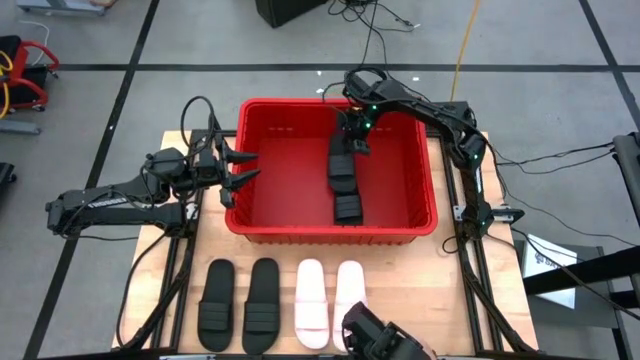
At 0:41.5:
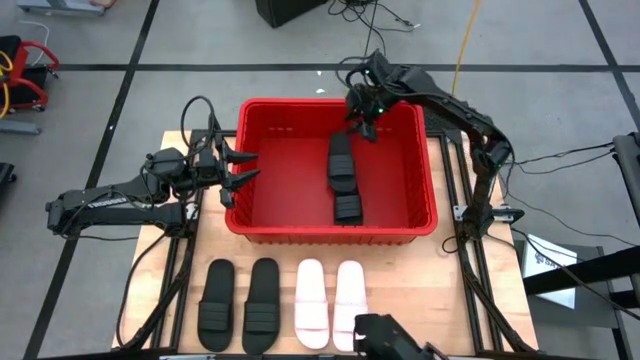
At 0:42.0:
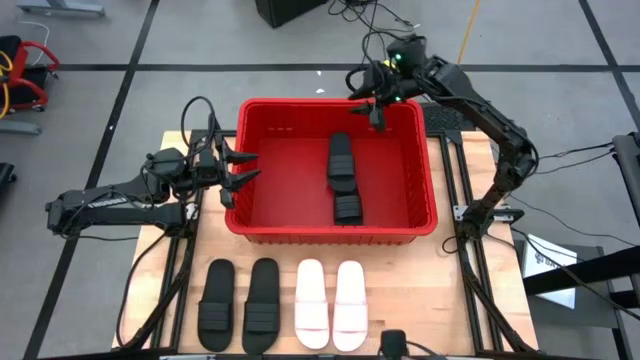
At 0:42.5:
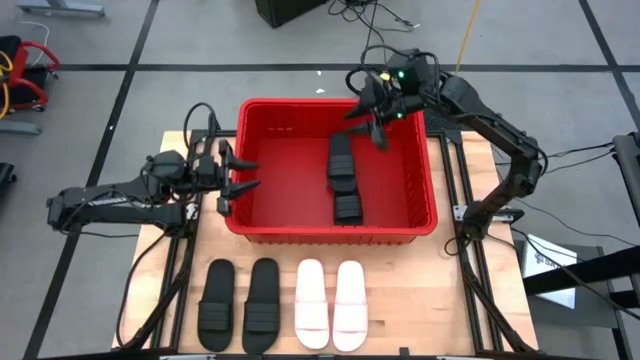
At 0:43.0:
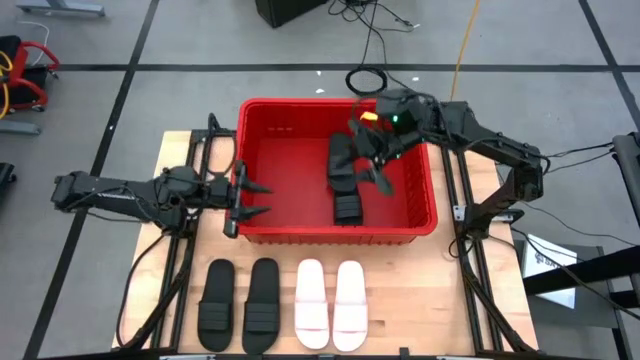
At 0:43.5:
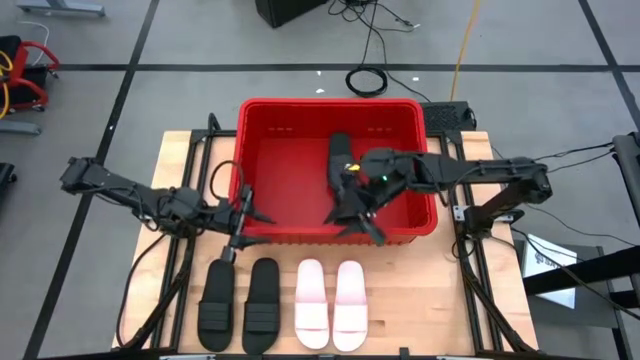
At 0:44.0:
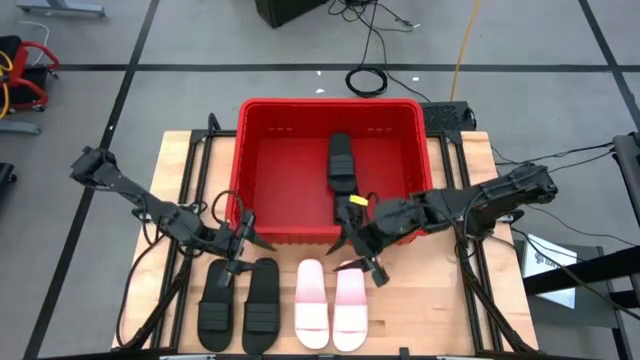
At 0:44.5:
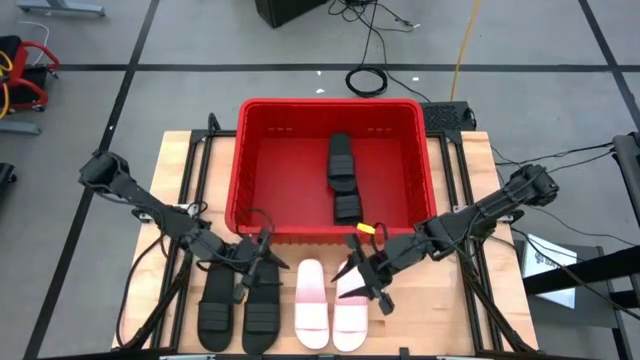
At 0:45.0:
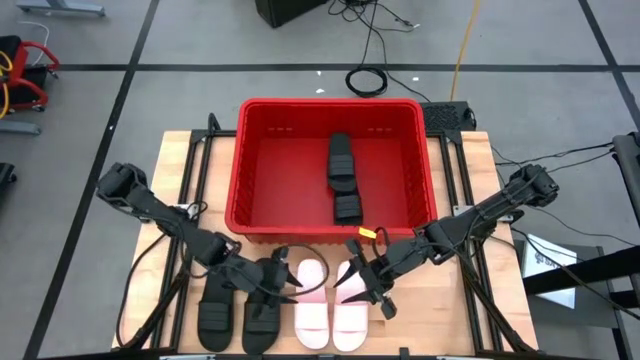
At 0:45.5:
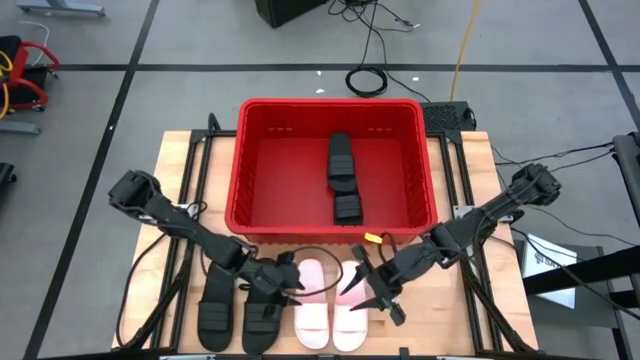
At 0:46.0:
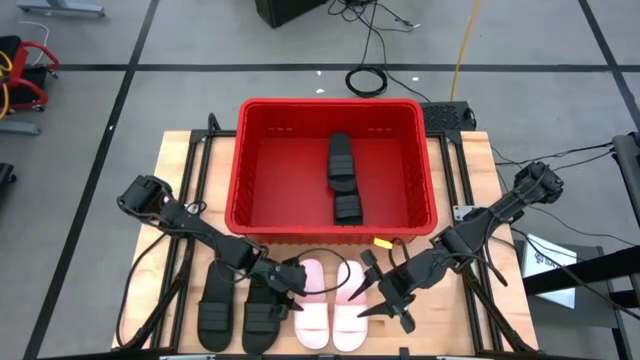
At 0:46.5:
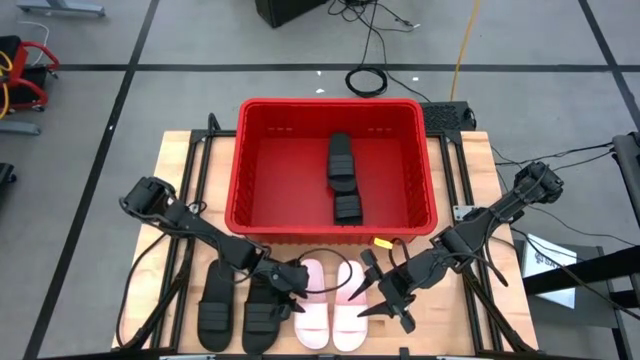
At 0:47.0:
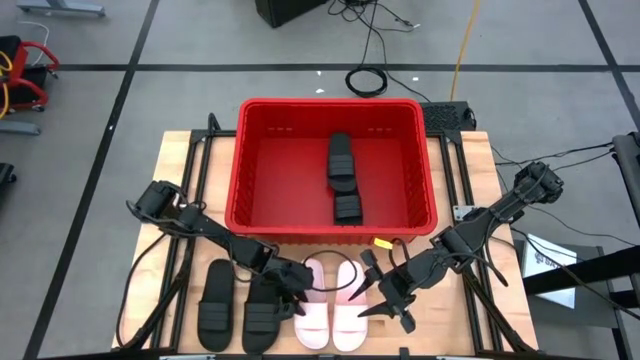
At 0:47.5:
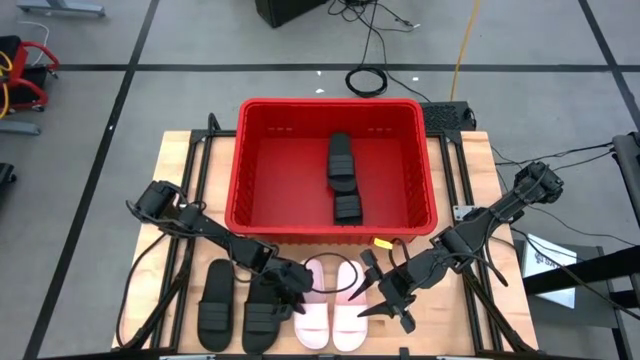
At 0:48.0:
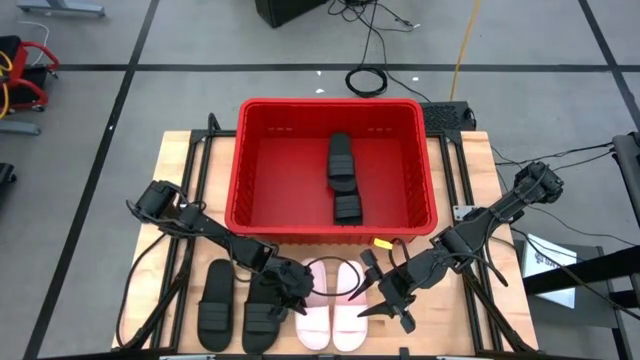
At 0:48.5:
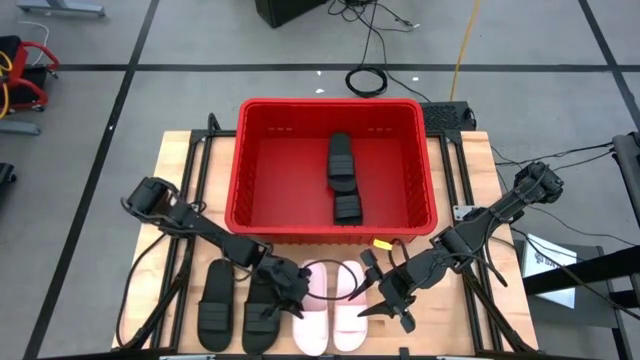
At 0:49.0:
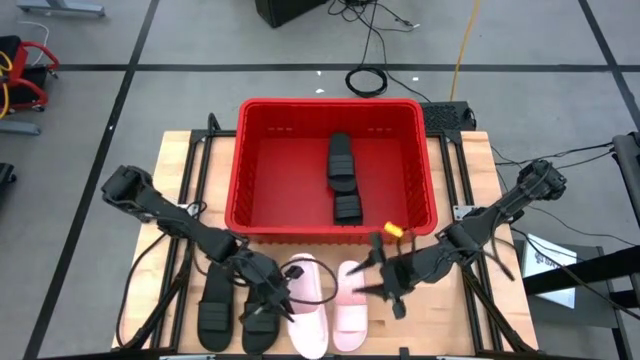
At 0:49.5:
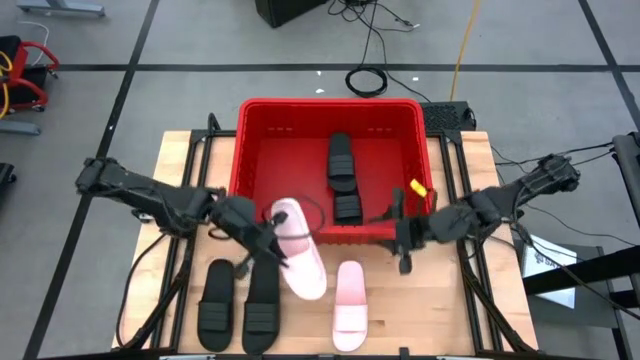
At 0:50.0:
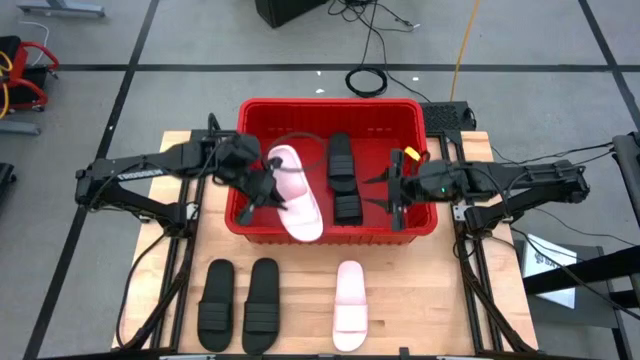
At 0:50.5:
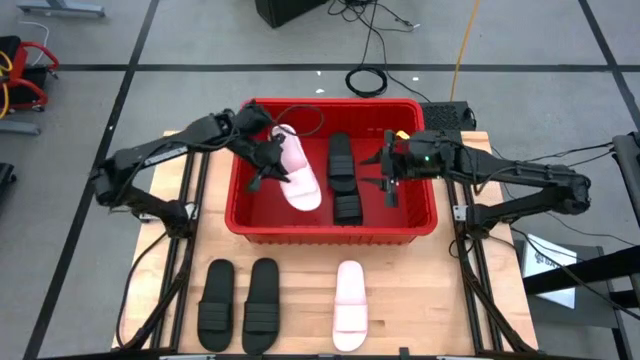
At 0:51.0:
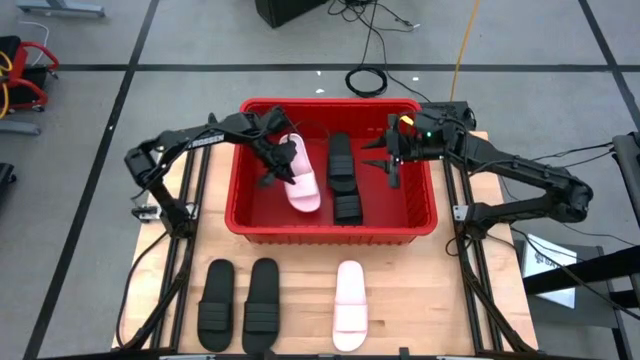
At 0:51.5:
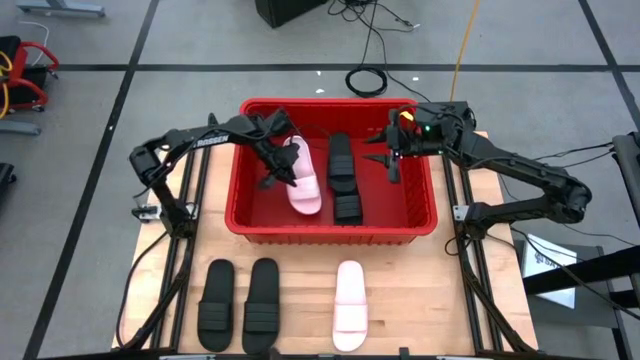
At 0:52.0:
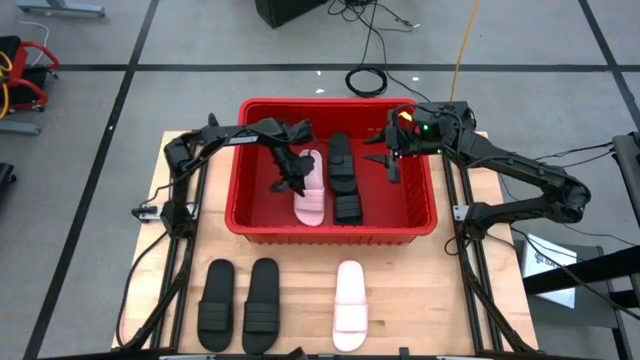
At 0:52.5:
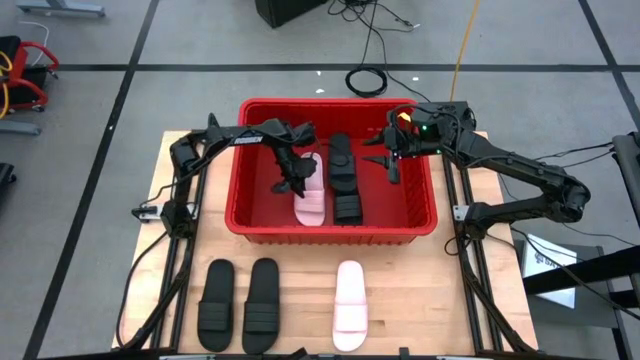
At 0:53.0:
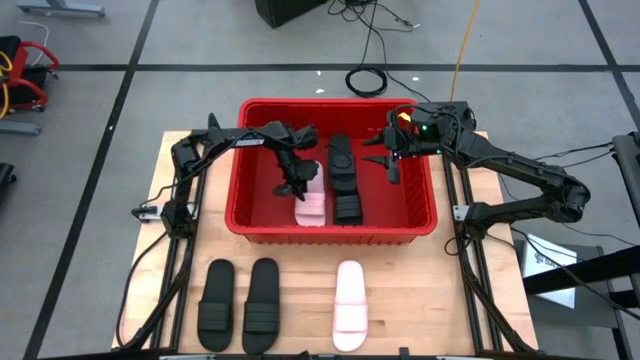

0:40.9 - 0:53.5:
Task: Pick and place slides into bin
Put the pink slide into the red bin

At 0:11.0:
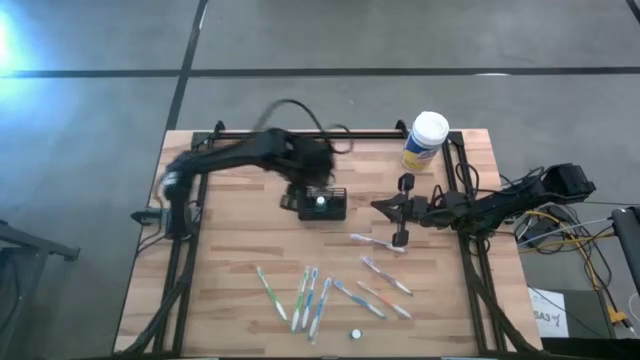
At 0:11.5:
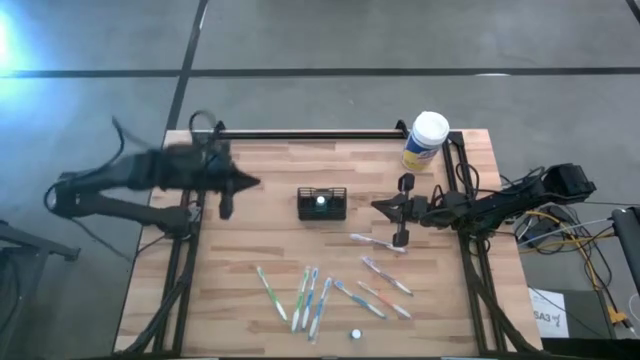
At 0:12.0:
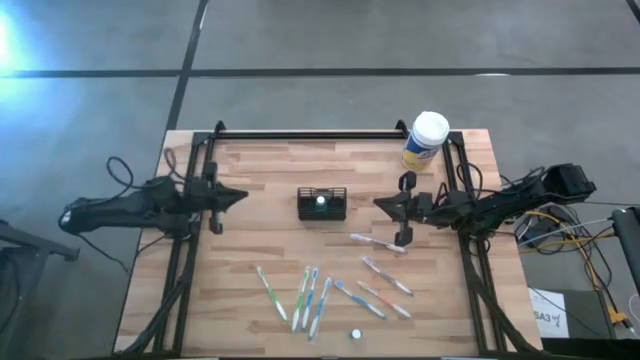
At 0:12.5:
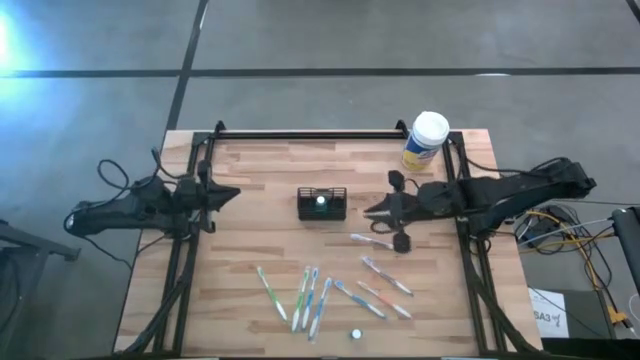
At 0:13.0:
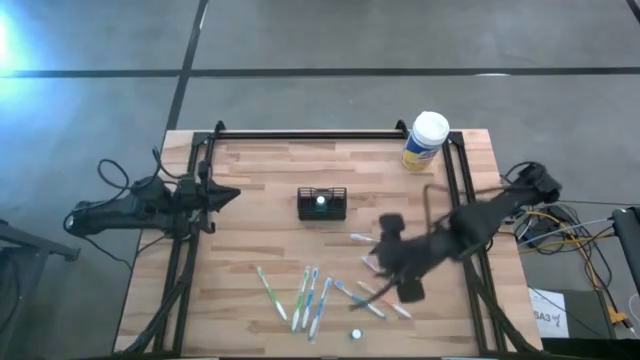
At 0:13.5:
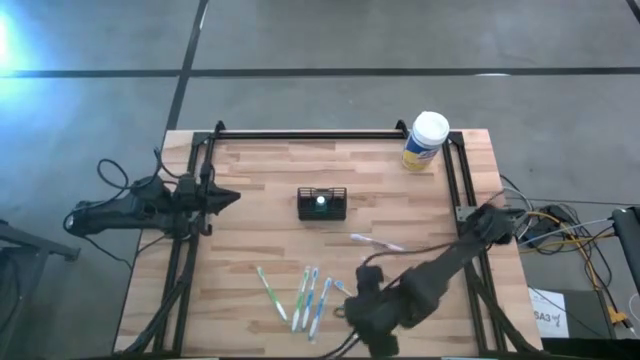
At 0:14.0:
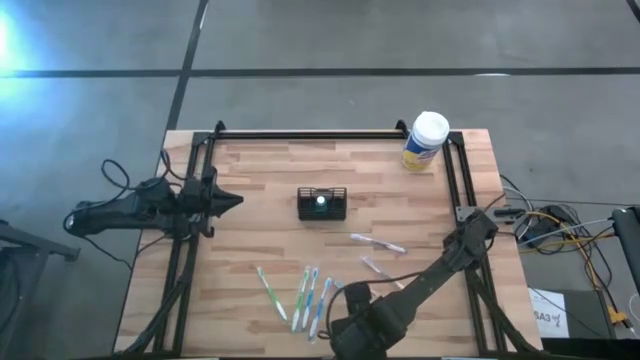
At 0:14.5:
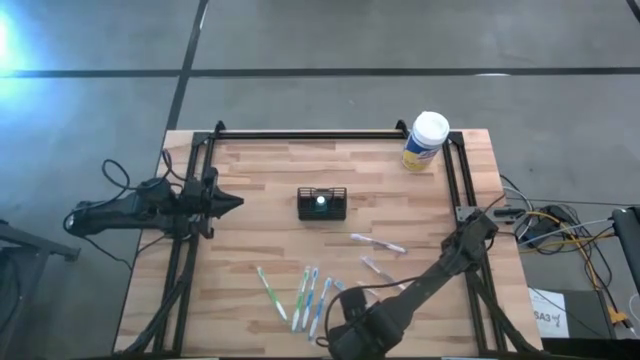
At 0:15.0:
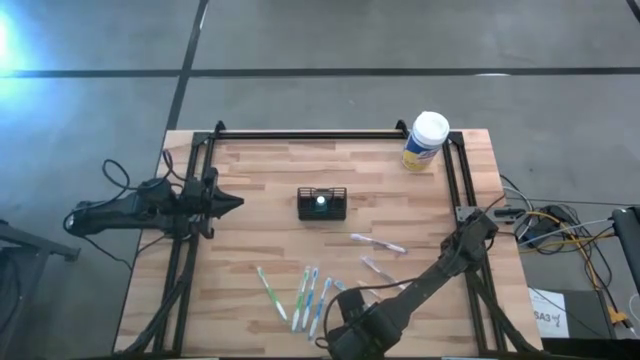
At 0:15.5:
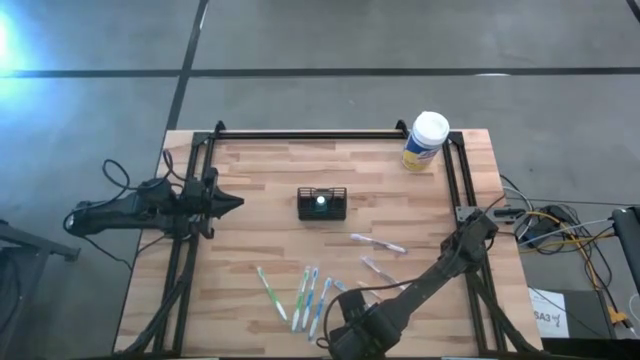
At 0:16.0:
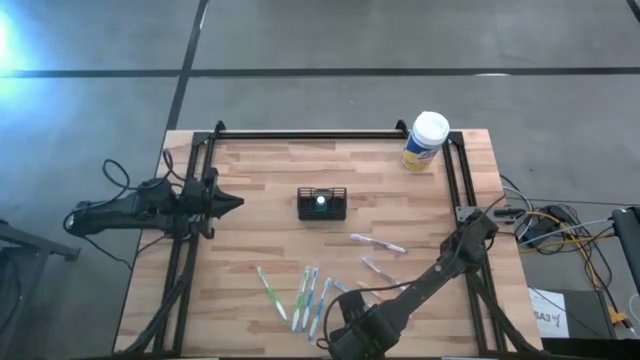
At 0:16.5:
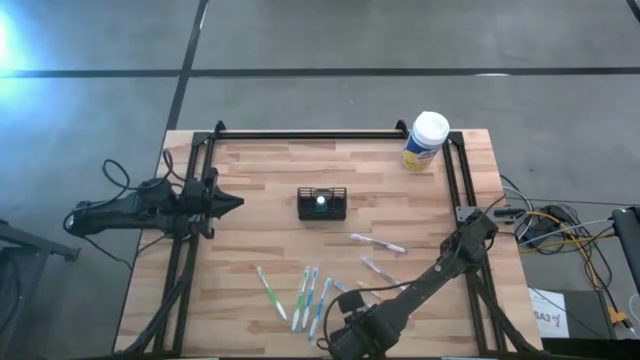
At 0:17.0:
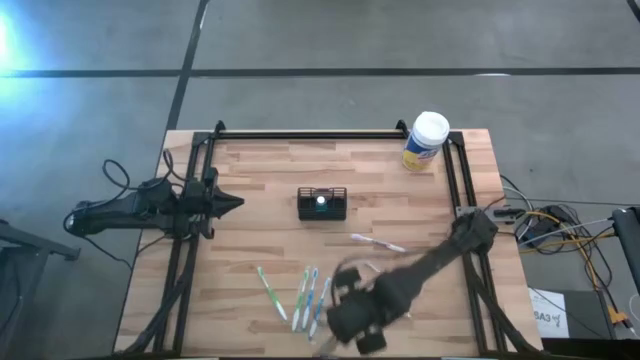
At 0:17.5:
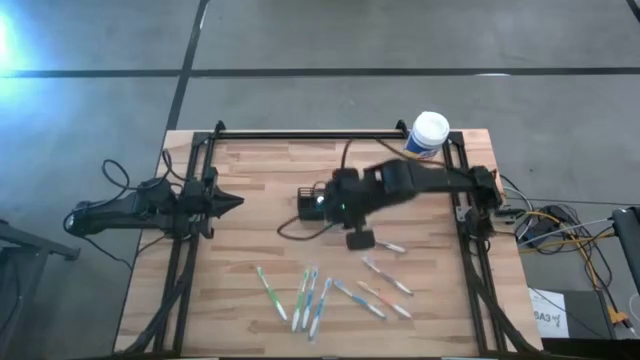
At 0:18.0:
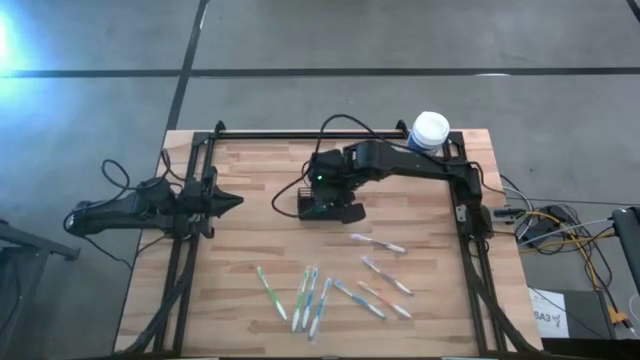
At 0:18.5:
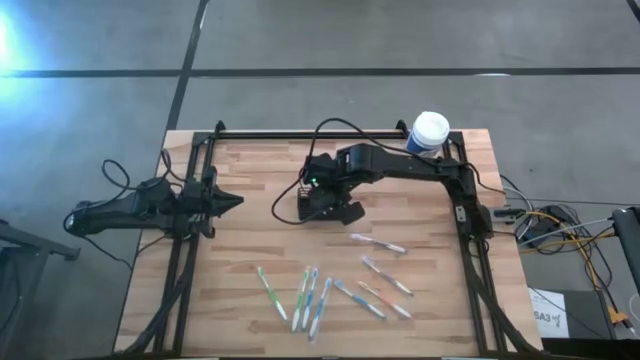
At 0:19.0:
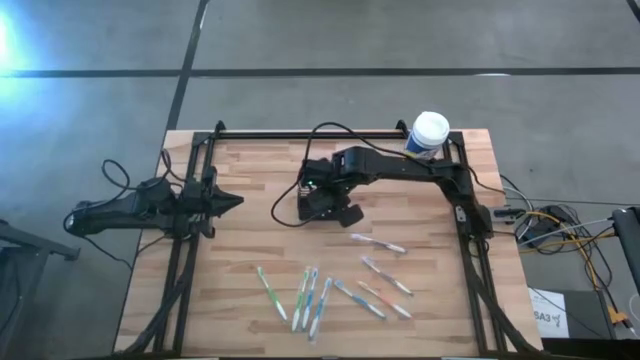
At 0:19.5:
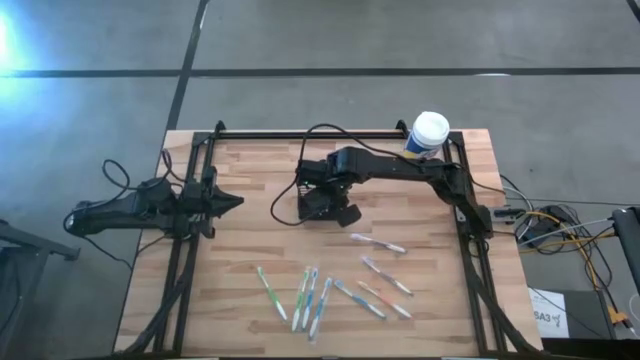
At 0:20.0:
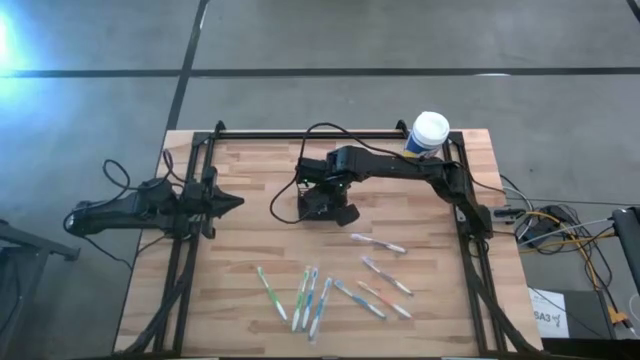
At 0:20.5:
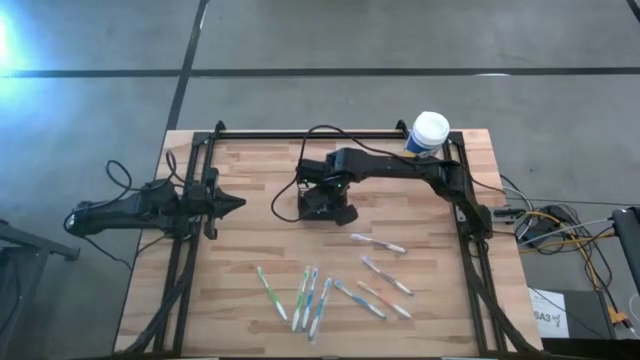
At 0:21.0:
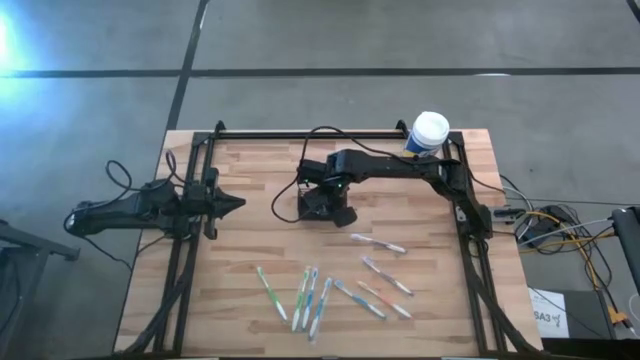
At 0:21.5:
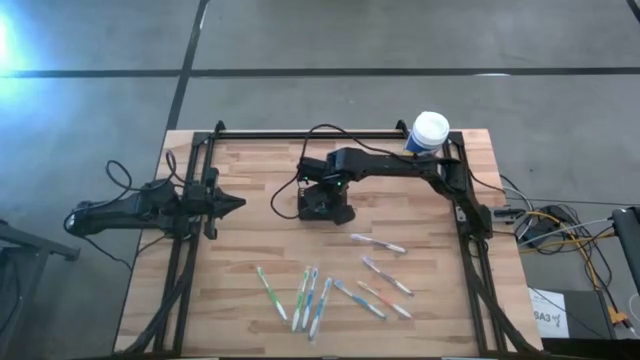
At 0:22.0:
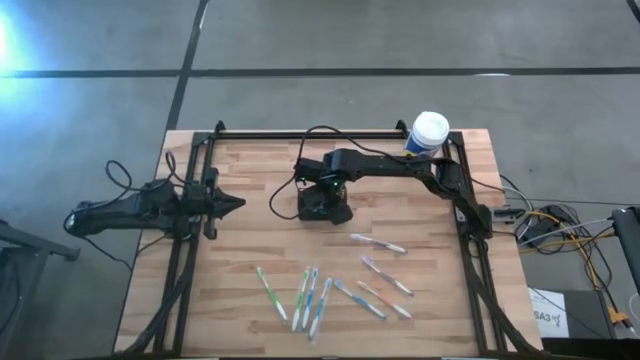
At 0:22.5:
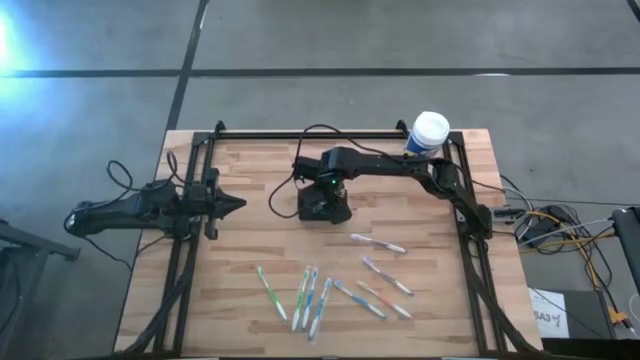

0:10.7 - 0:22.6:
Task: Pick & Place toothbrushing station
Put the blue mouthwash in the wire organizer
